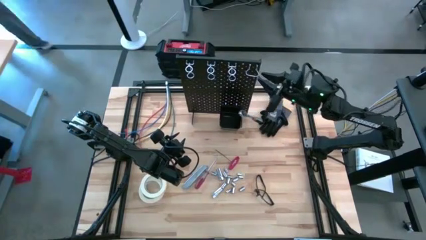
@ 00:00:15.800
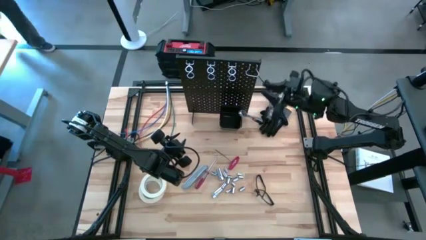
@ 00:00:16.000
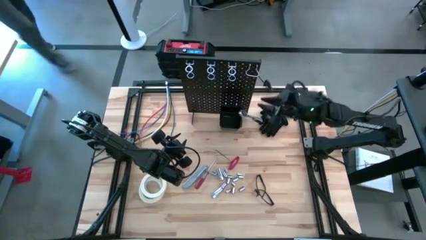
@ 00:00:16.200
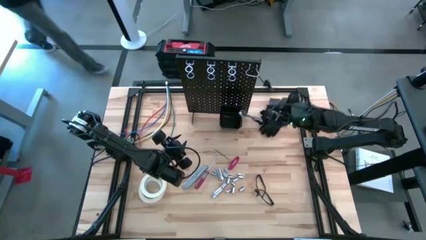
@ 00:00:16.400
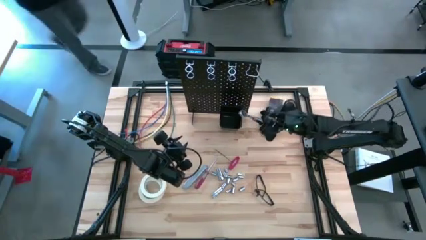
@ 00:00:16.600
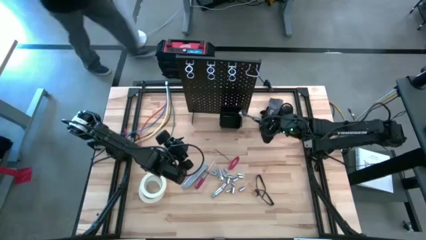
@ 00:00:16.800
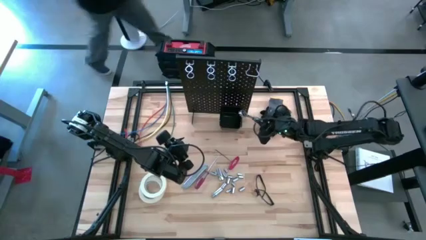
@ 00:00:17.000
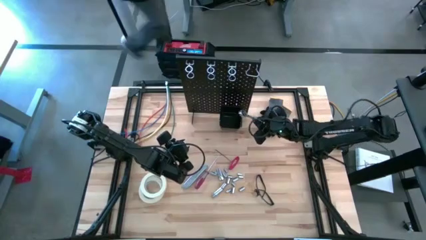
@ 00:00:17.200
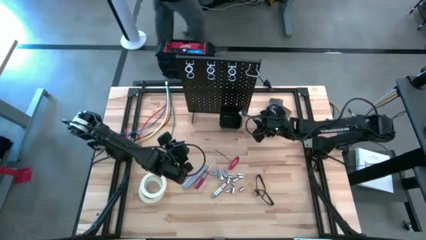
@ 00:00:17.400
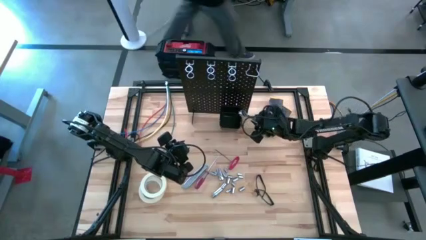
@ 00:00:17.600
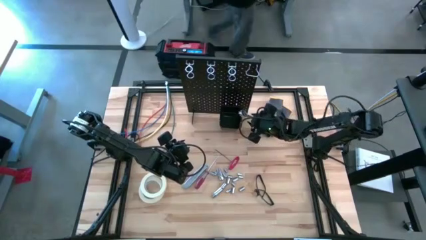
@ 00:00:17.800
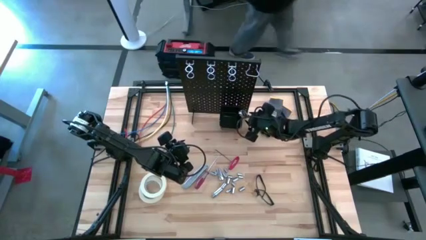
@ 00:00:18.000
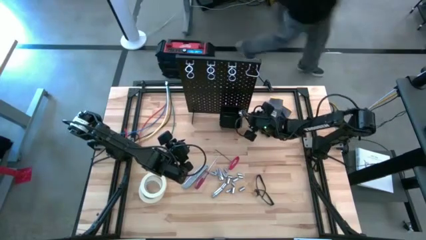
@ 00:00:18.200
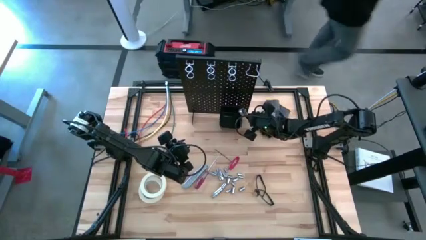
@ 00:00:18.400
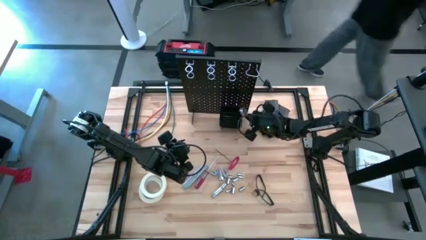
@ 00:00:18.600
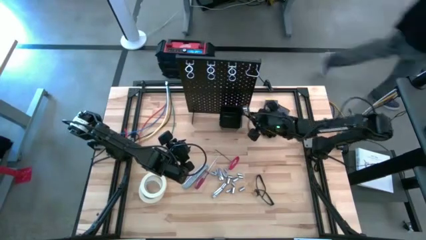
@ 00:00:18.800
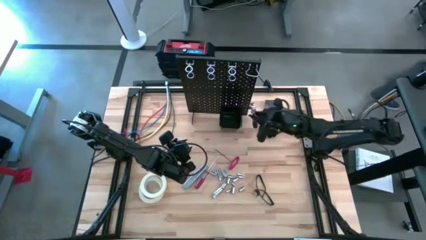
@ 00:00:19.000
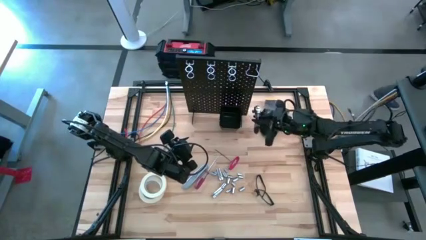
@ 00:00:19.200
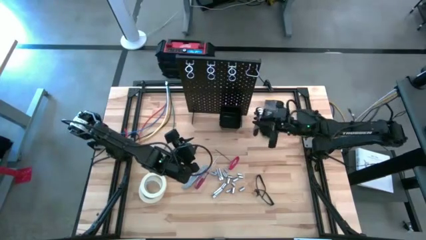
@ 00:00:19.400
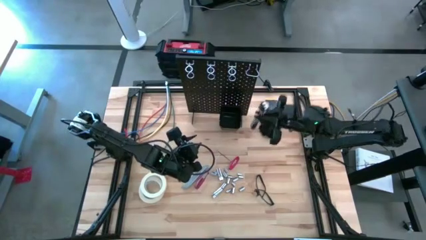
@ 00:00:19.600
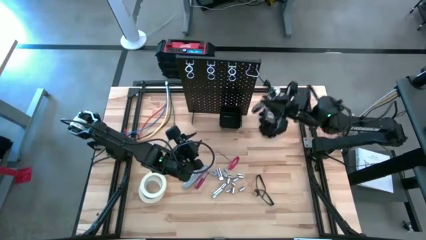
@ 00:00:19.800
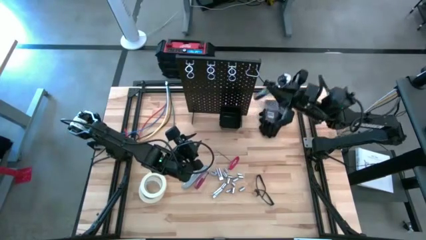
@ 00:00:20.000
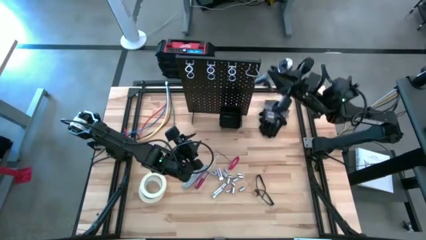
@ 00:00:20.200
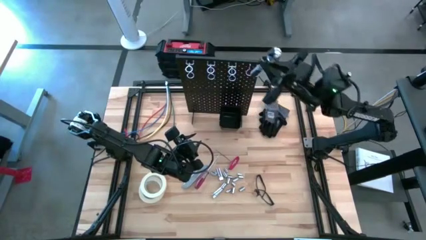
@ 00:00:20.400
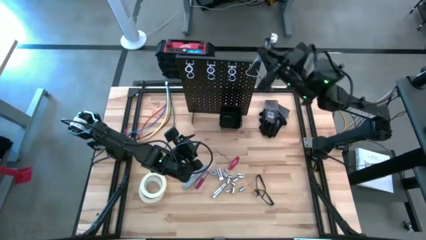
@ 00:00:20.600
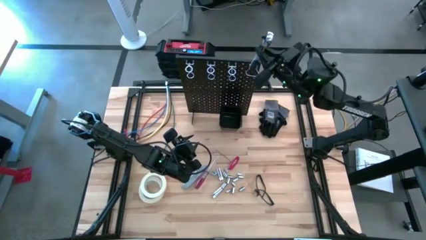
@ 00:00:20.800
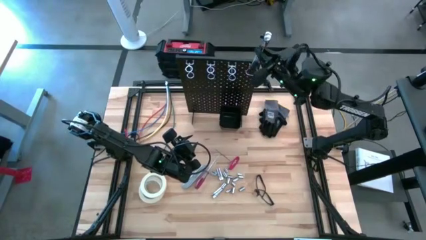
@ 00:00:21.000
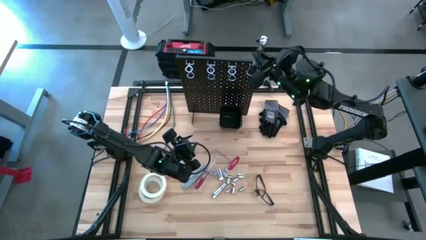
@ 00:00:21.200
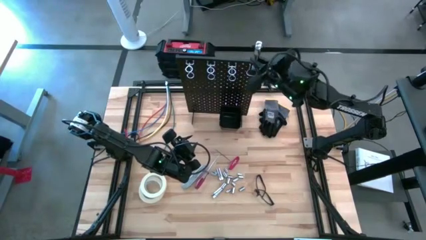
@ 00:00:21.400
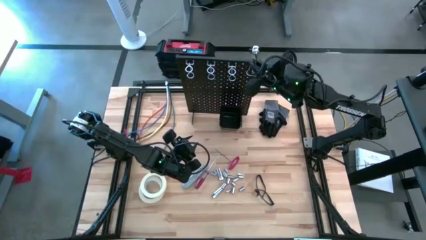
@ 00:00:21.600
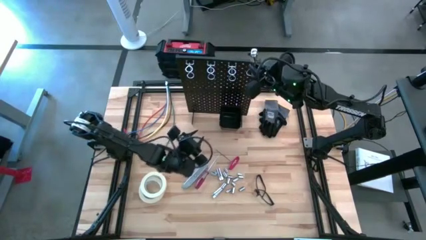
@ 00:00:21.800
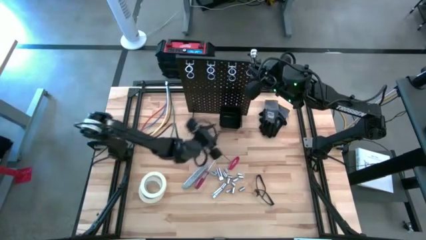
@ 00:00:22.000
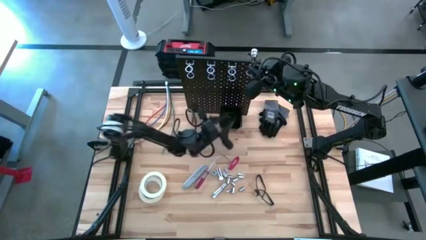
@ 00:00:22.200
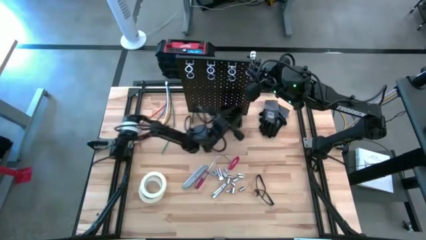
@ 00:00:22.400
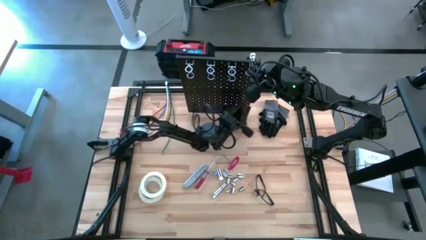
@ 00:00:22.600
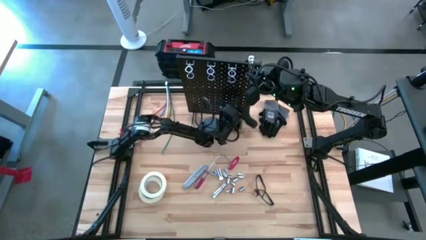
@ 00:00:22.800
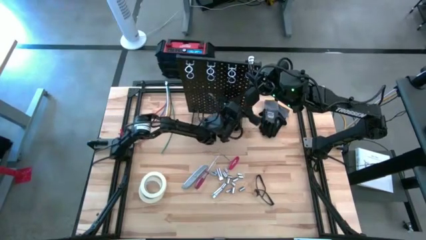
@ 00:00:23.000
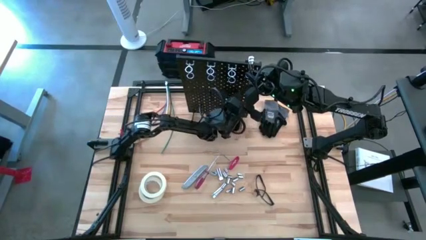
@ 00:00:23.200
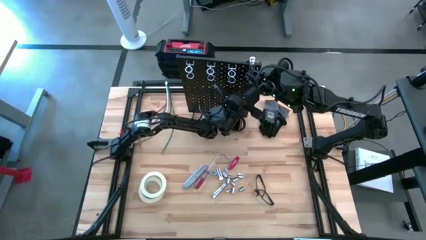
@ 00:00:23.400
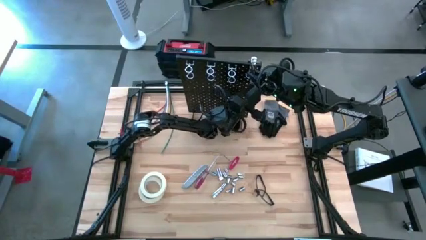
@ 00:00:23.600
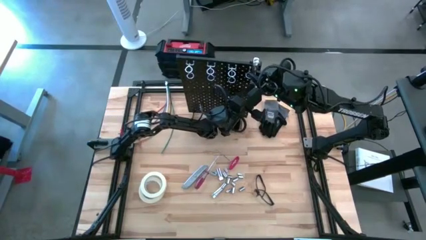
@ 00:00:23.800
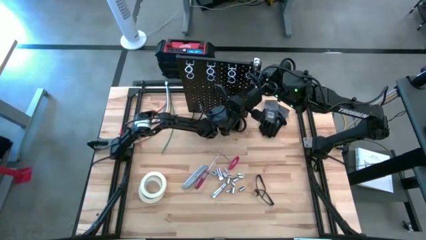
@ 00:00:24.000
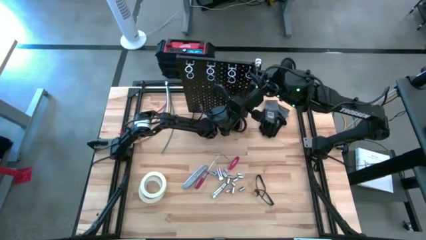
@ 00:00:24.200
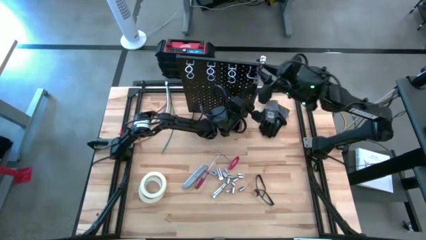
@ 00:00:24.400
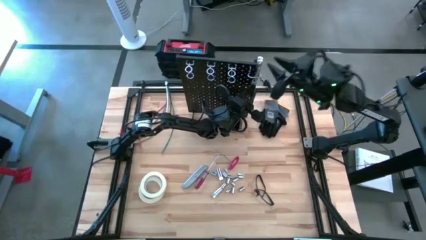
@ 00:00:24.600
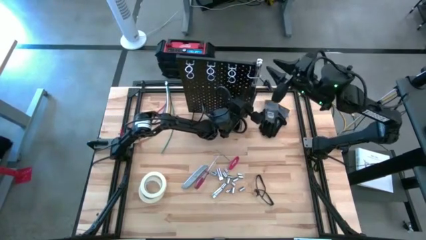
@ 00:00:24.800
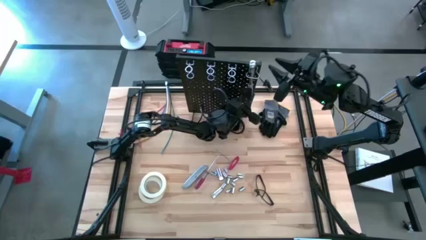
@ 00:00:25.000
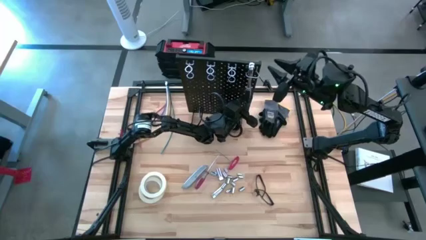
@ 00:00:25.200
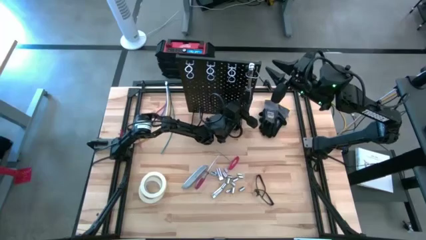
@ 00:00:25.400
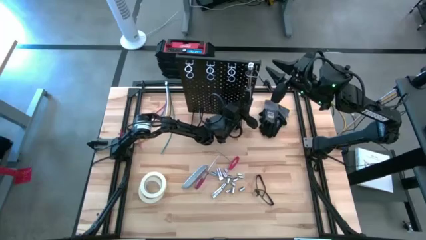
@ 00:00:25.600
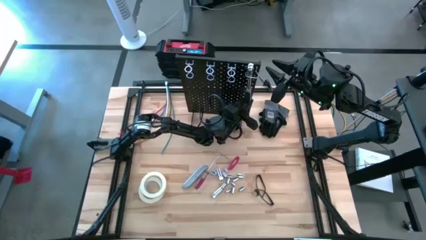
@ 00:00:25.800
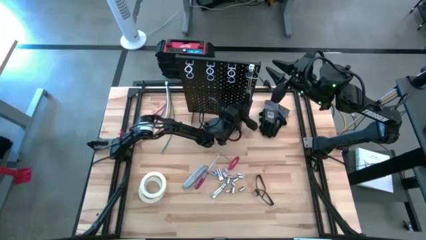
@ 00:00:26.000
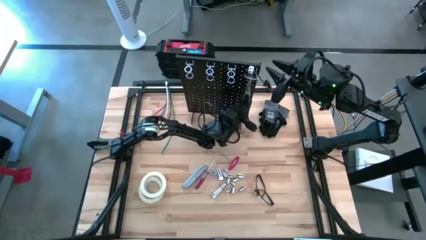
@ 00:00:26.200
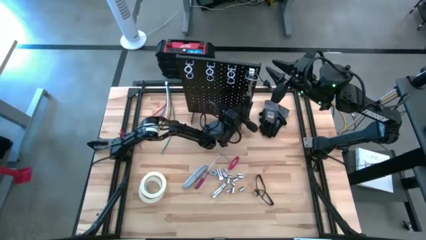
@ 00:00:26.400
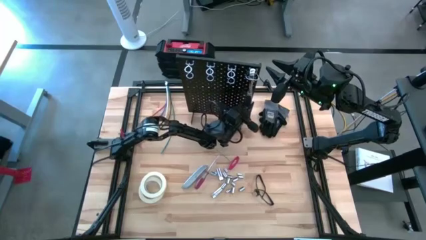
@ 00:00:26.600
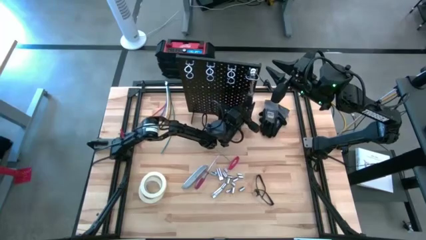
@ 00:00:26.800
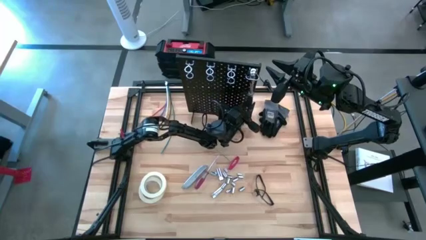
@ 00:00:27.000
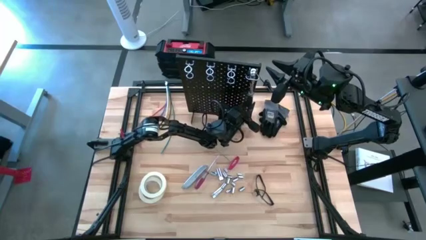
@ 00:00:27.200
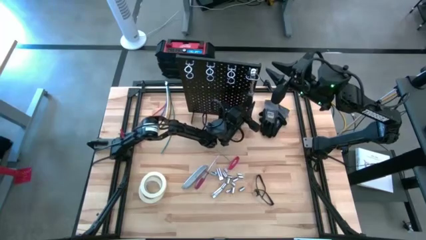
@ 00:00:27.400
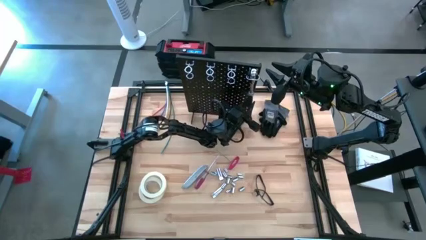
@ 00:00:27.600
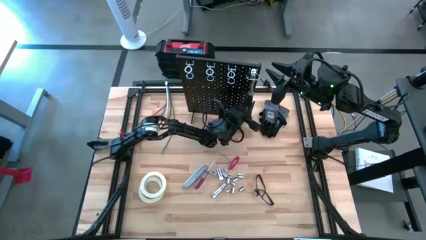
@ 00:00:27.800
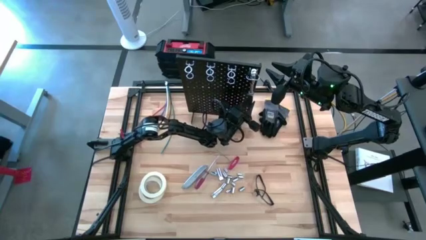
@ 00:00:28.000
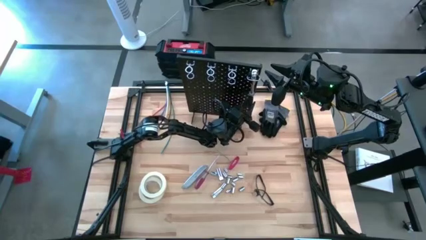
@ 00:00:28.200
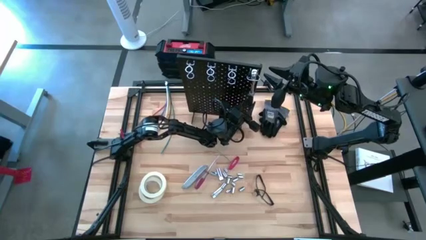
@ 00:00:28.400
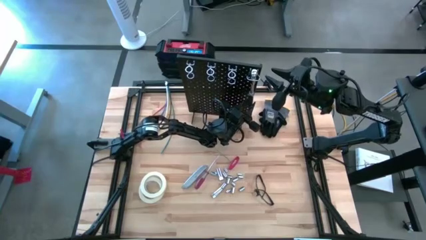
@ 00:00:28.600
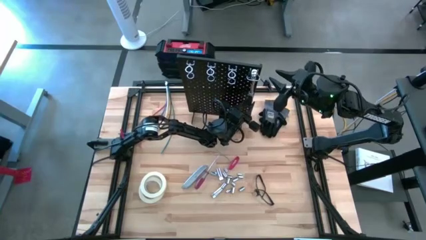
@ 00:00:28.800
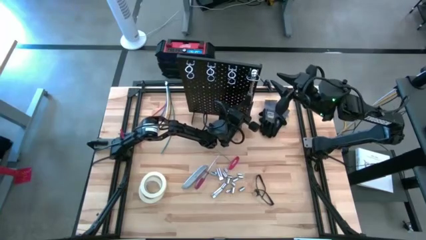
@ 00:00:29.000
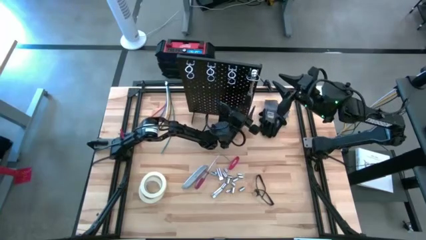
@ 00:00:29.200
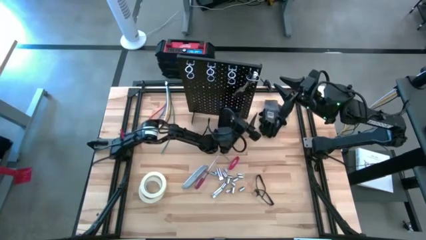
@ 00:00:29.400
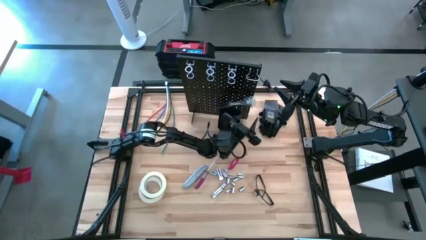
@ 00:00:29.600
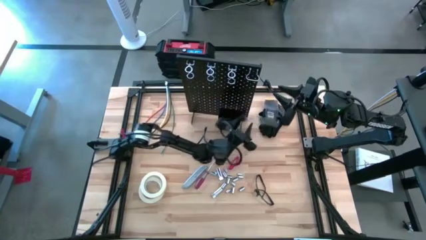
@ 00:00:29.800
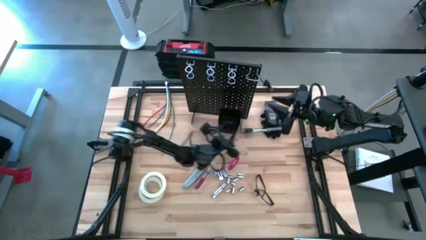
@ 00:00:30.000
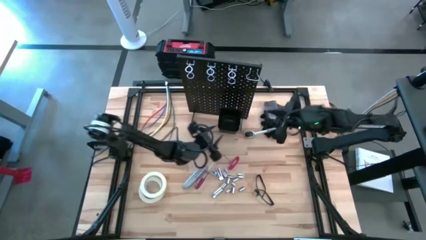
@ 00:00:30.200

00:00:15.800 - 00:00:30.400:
Task: Hang tools onto peg board
Hang the ratchet wrench on the peg board
